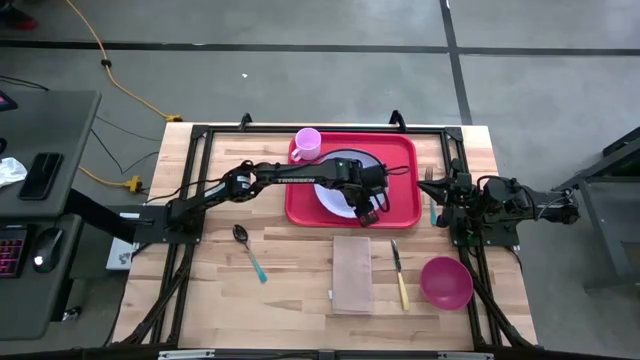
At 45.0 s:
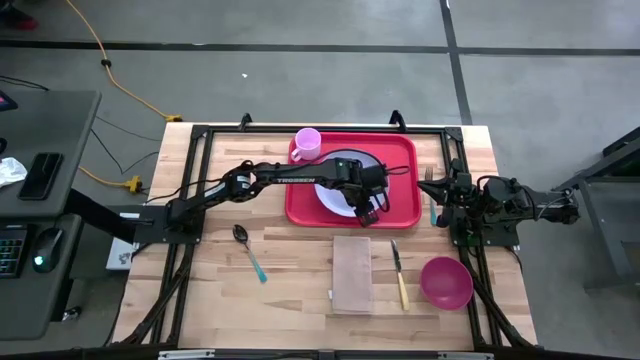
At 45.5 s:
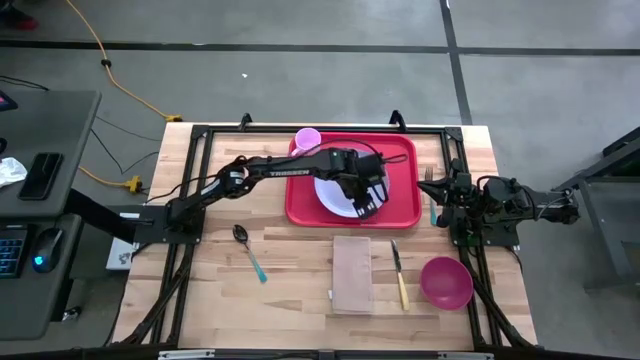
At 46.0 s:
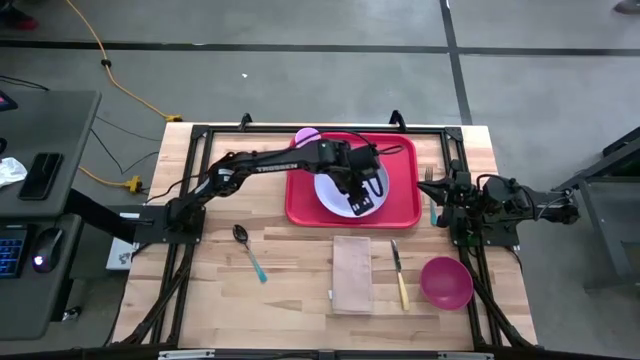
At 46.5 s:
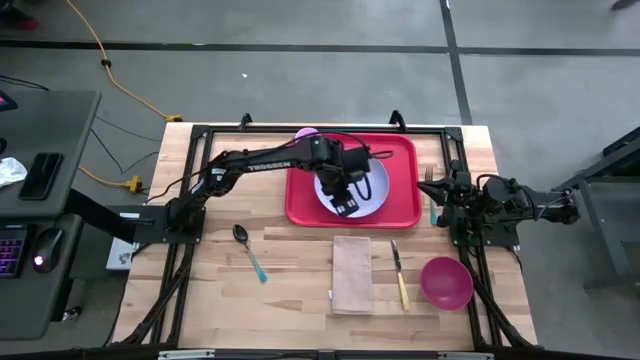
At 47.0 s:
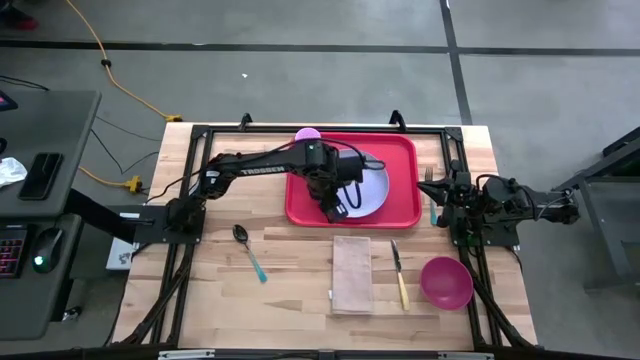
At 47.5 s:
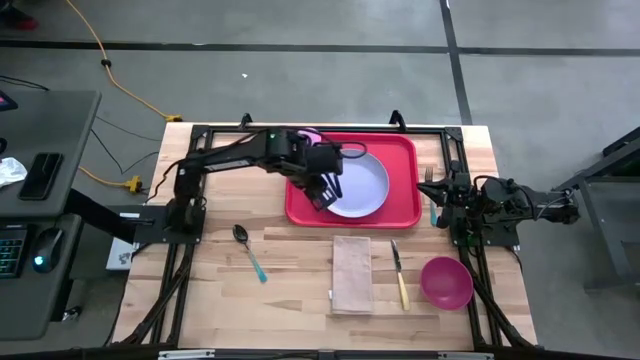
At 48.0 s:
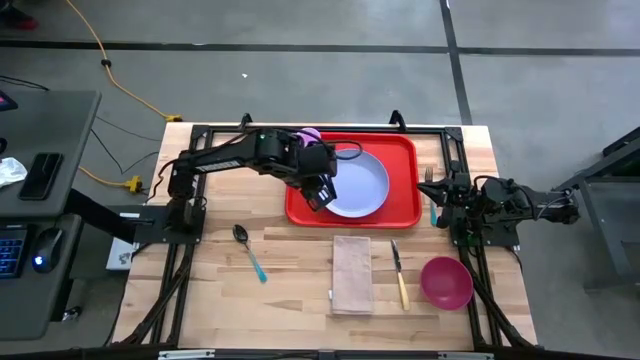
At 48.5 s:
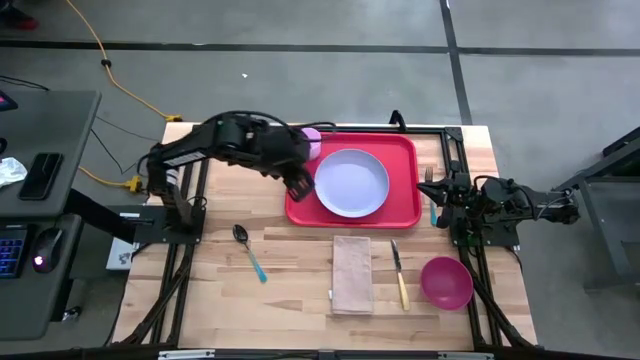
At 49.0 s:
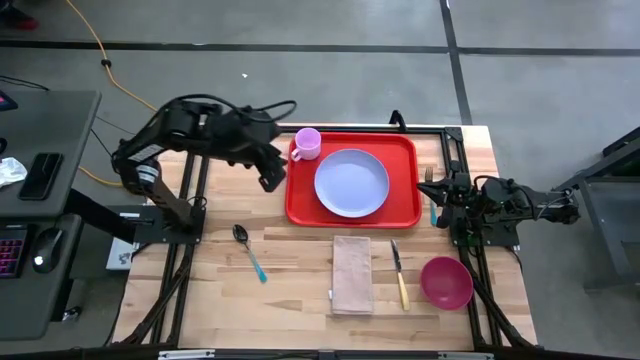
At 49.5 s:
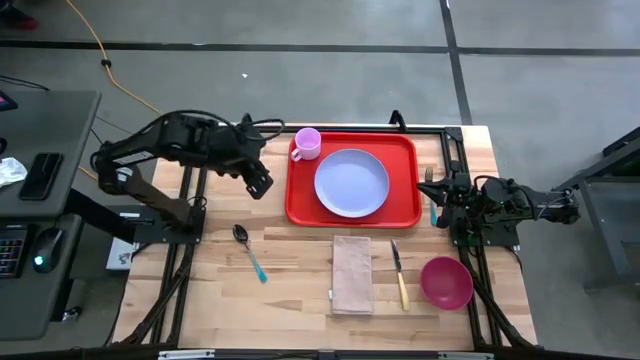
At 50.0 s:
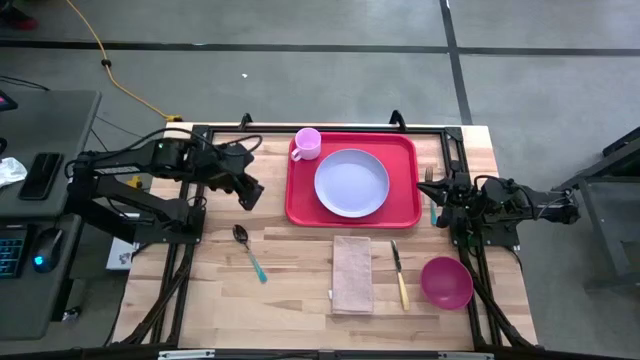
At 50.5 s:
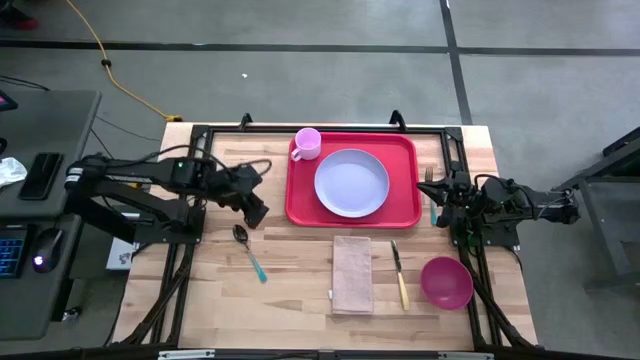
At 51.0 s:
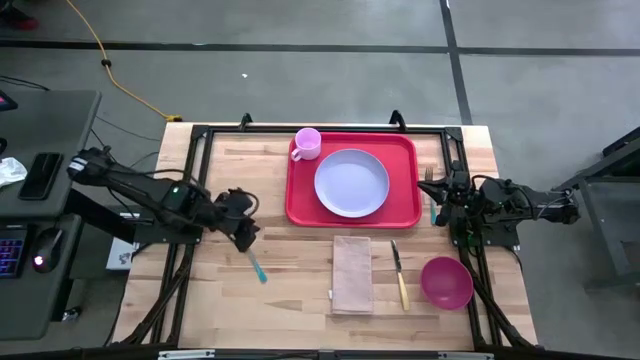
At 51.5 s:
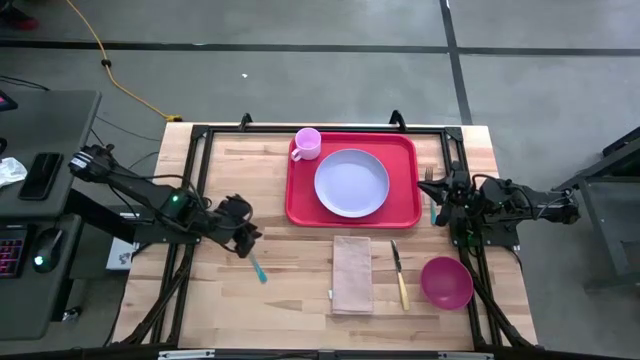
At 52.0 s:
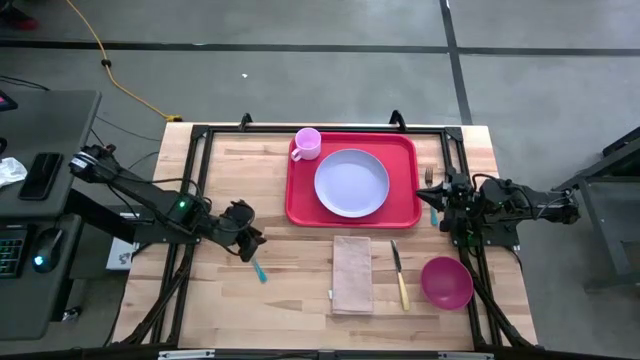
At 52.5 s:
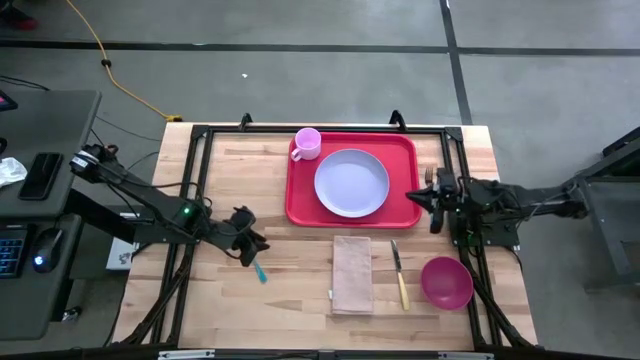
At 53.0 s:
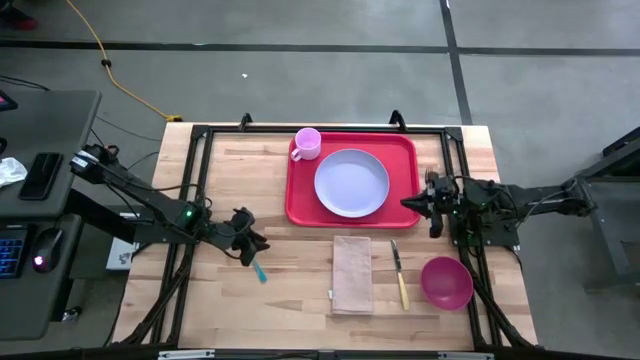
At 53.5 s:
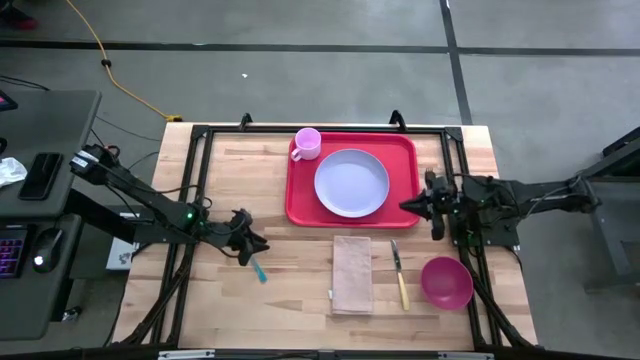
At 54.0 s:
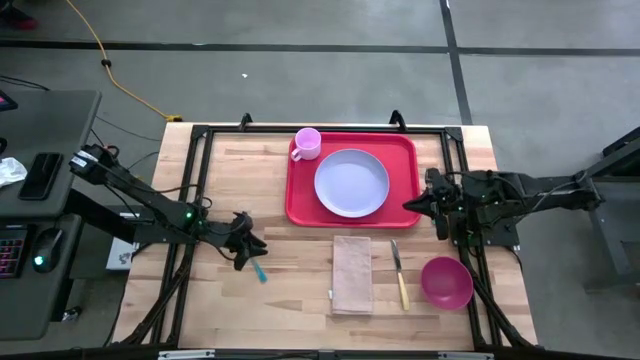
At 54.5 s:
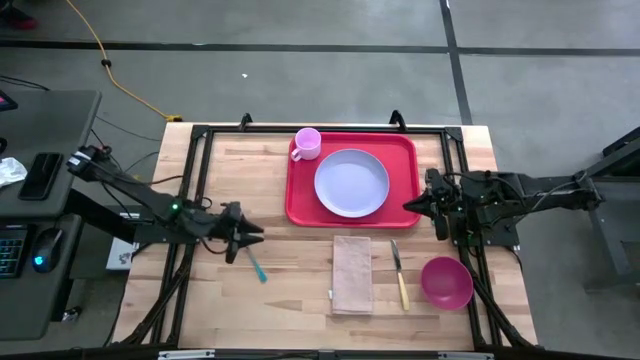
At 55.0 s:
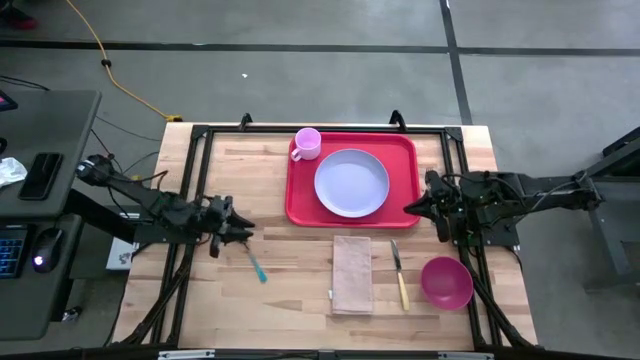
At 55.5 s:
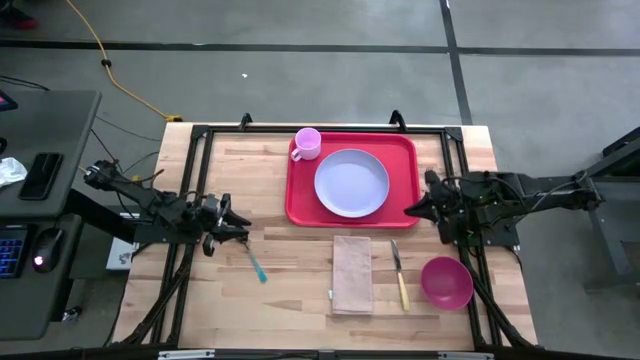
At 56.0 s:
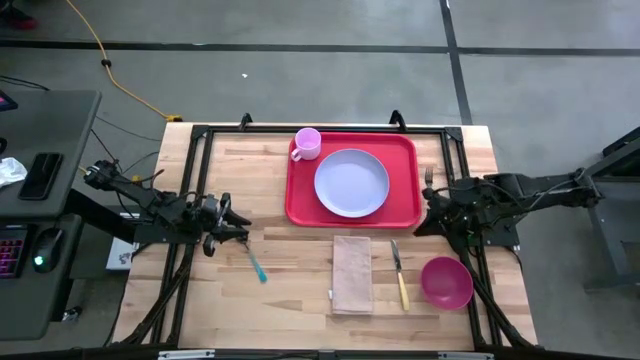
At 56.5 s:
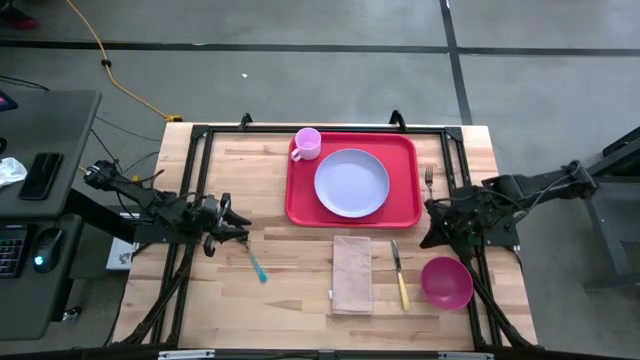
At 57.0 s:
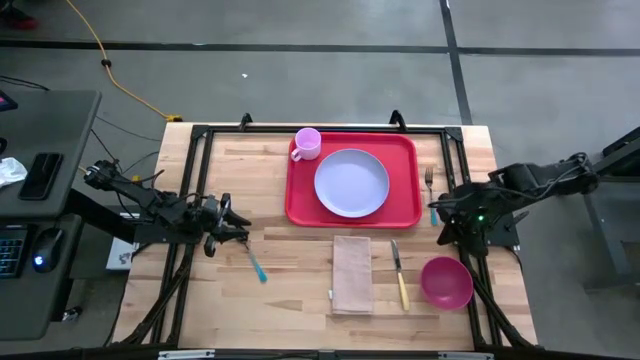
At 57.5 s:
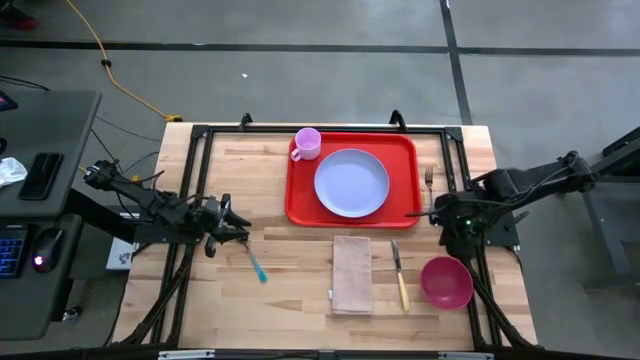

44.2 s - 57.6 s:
Task: Set up tray
Put the red bowl on the blue plate on the red serving tray
